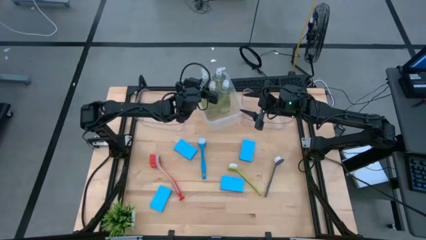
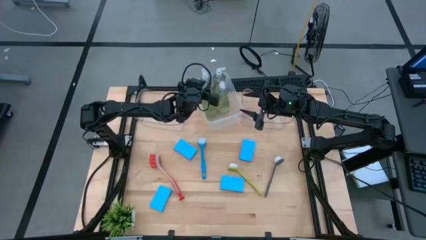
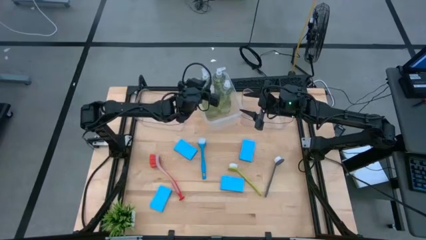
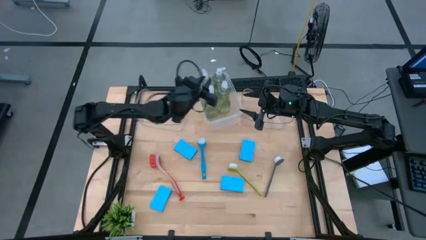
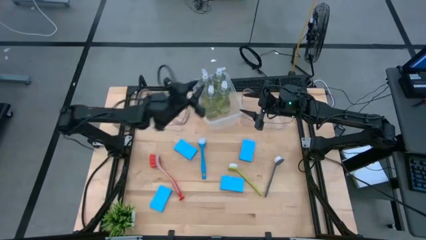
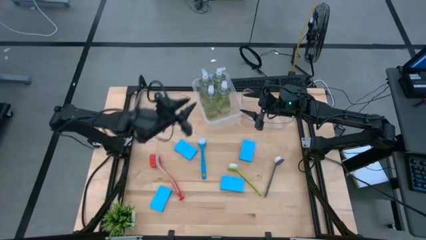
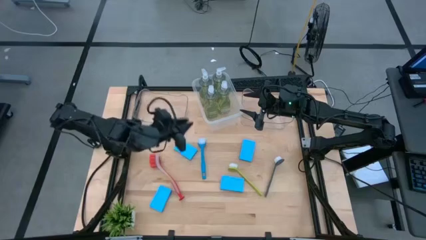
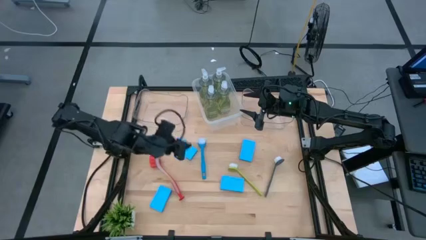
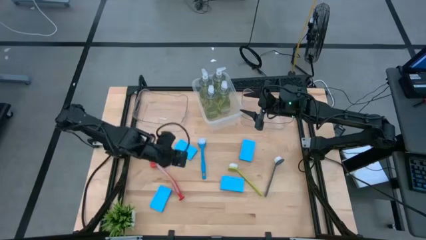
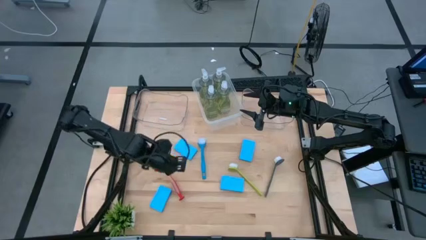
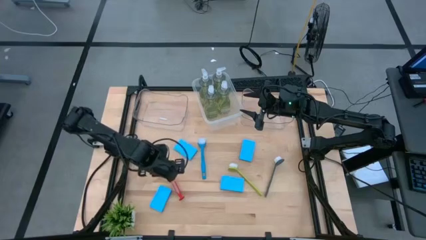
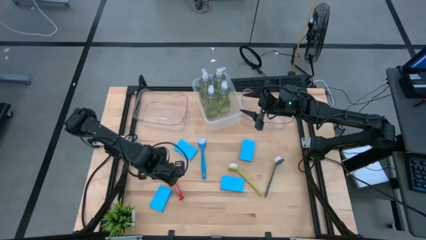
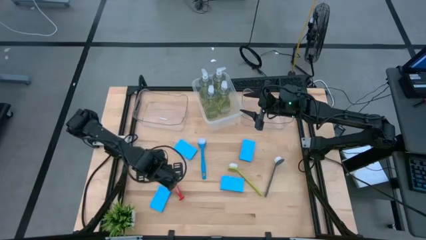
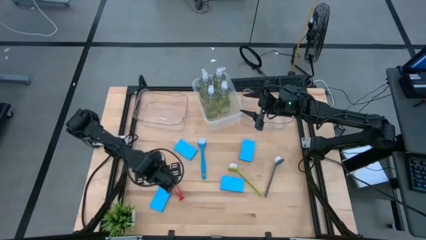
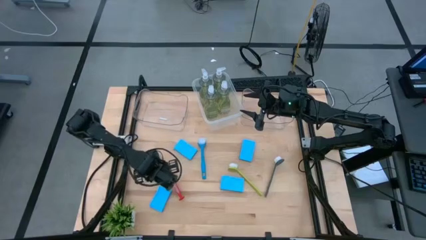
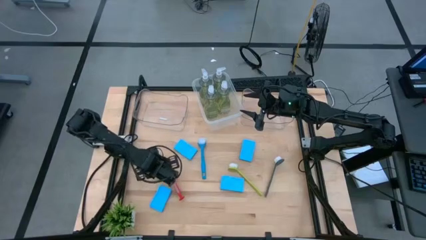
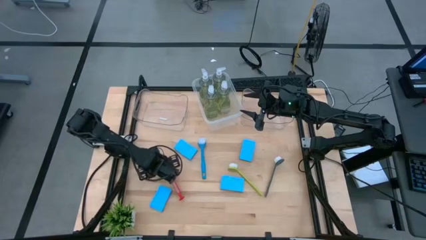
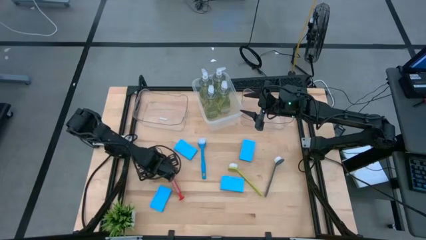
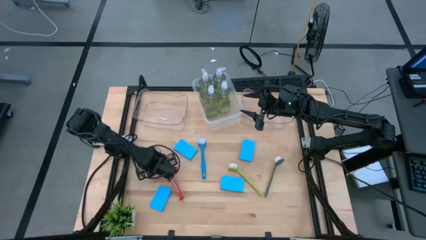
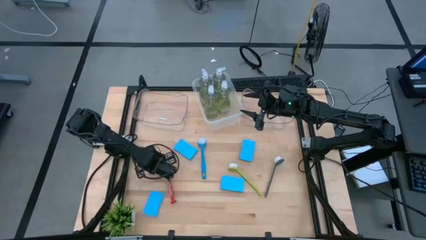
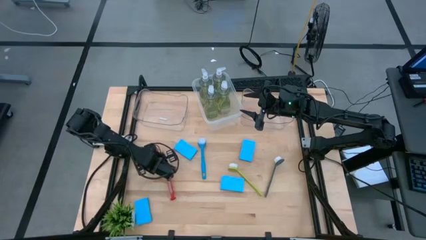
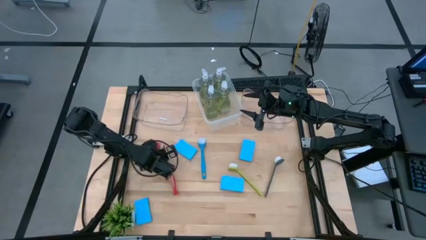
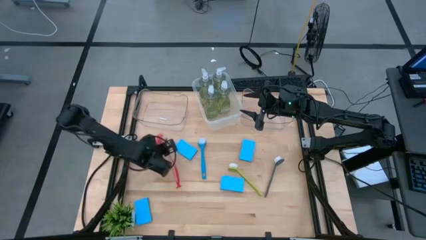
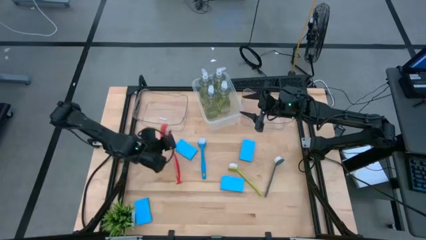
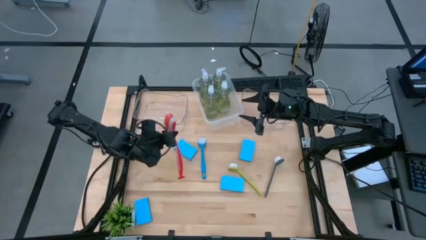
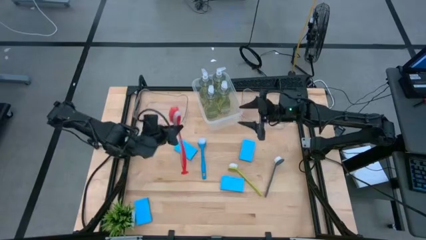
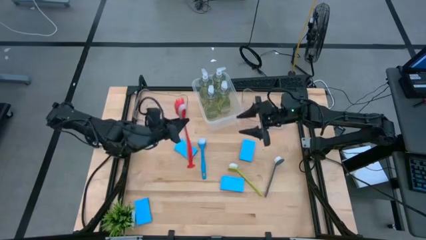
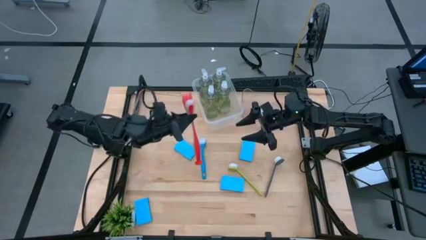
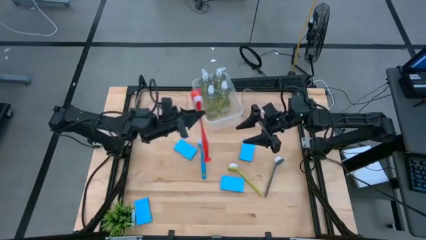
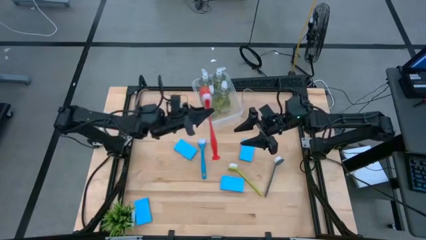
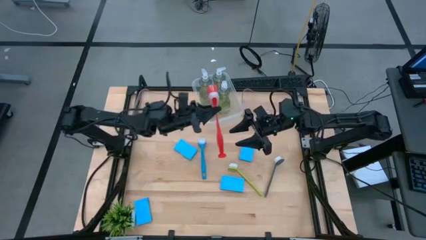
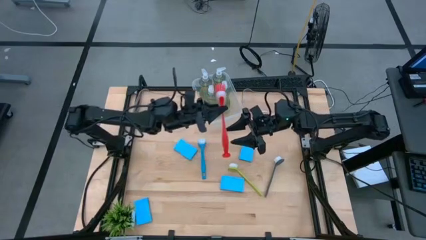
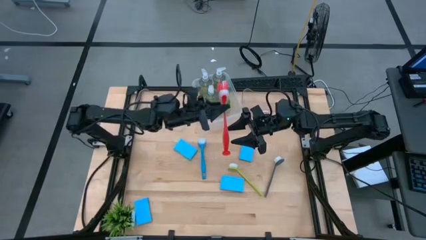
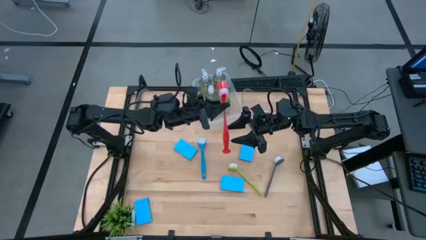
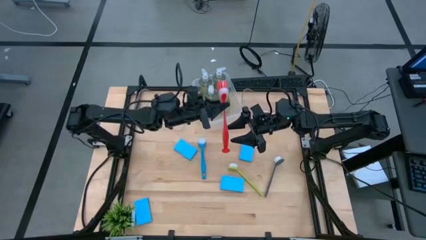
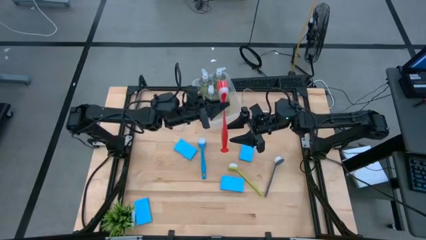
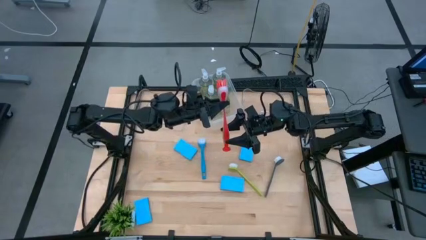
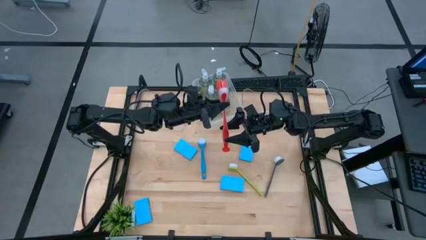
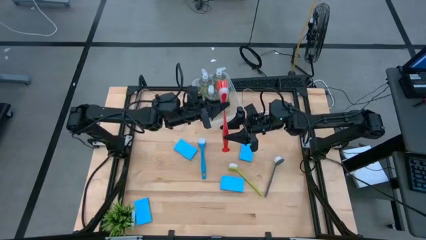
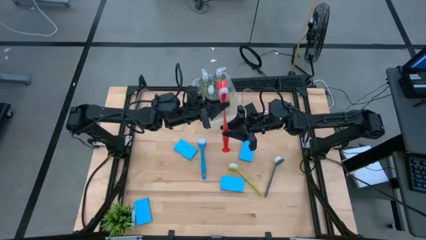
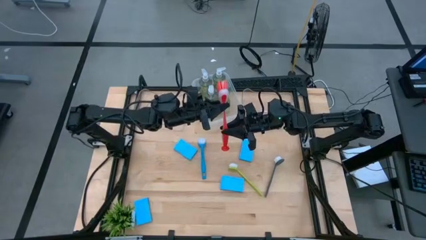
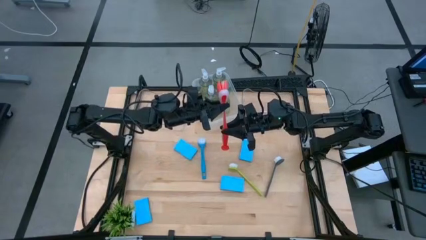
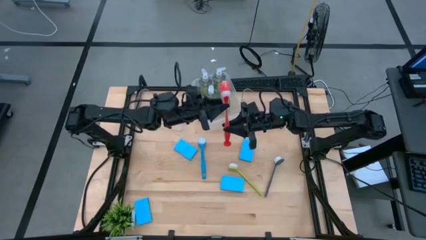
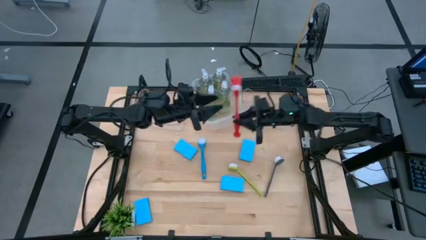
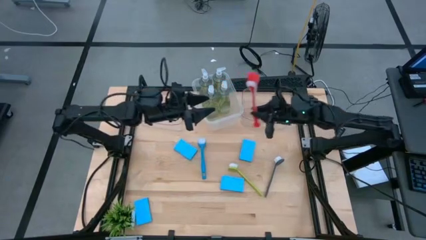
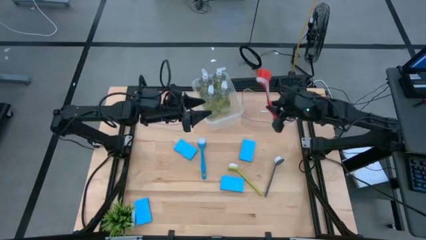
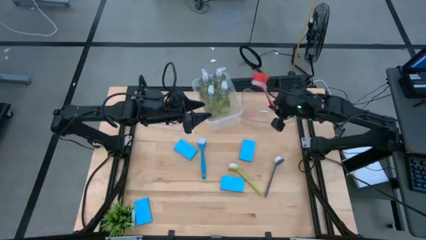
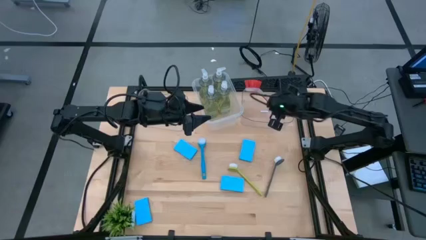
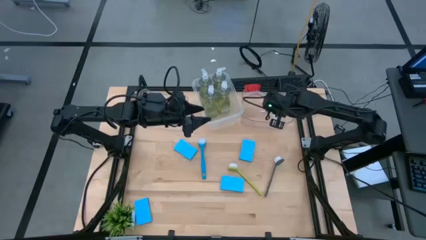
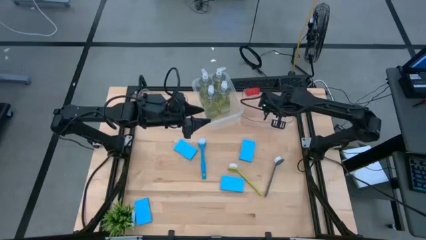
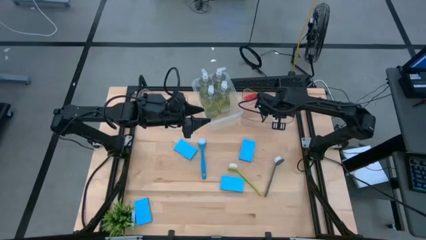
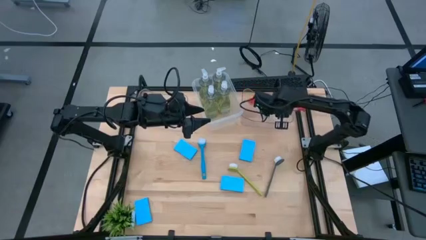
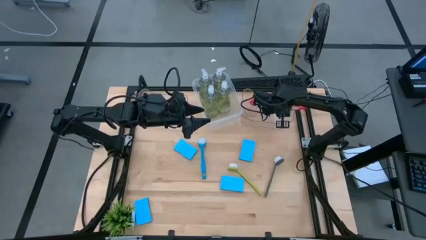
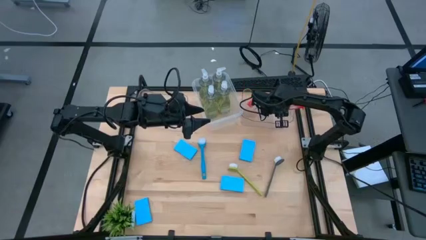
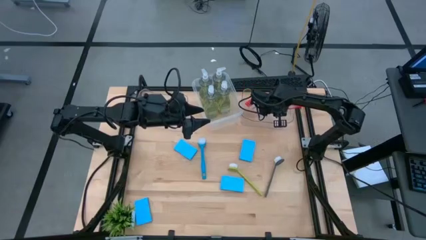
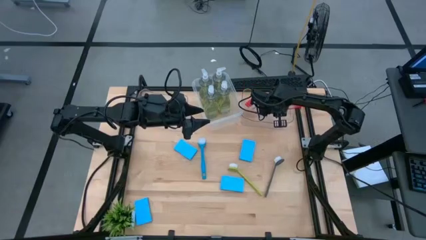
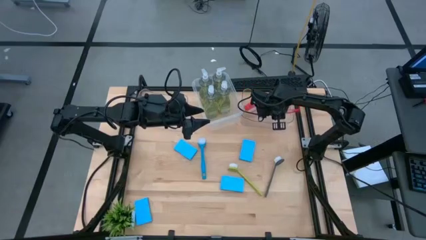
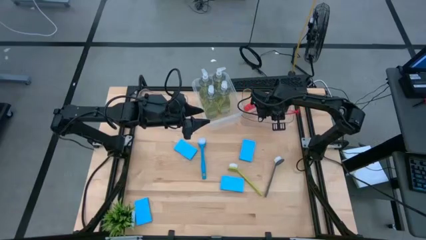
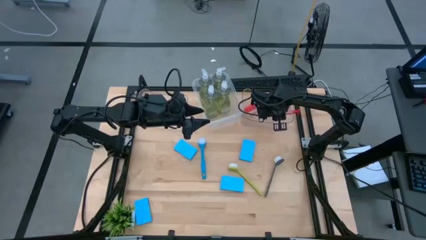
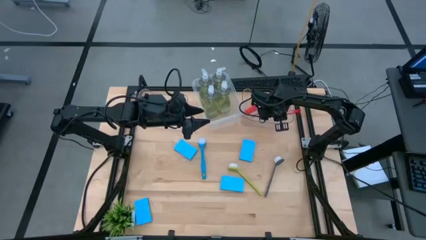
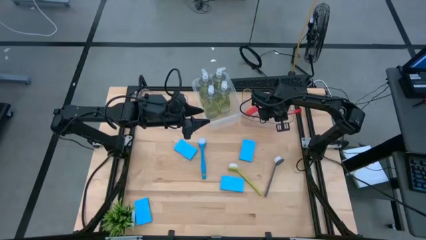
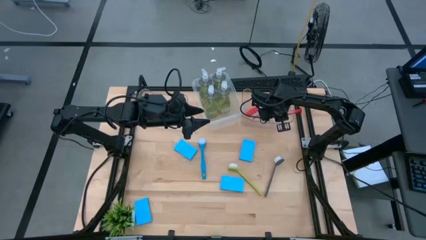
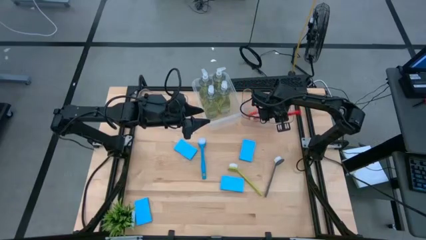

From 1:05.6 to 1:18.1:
Task: Pick & Place Kitchen Sink Supplies
Put the red dish brush into the right transparent bin

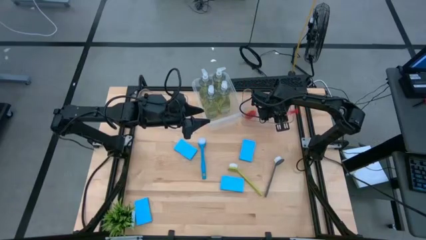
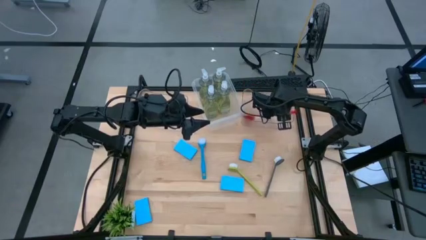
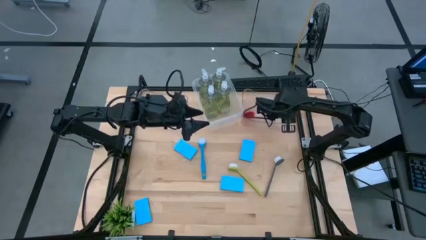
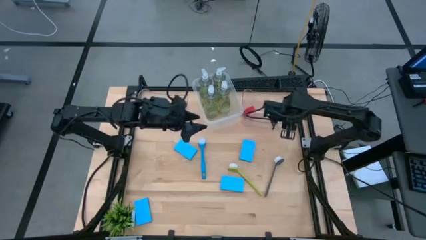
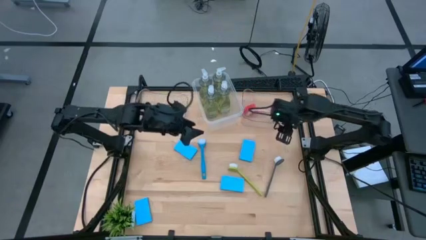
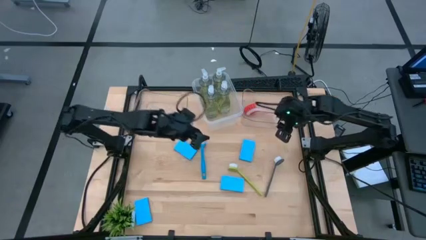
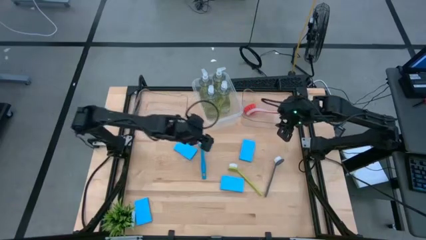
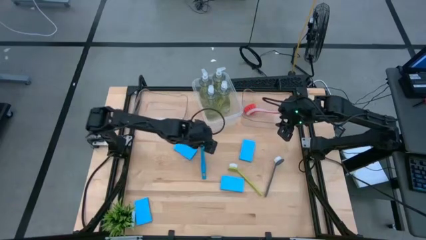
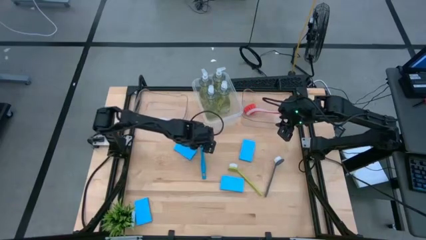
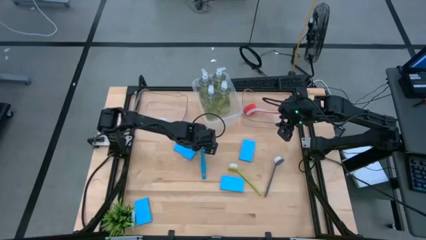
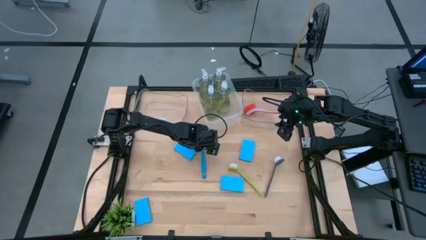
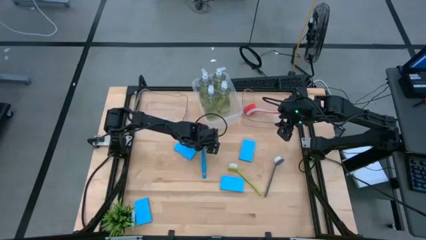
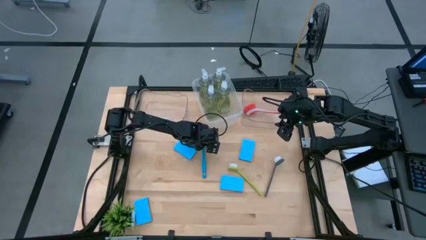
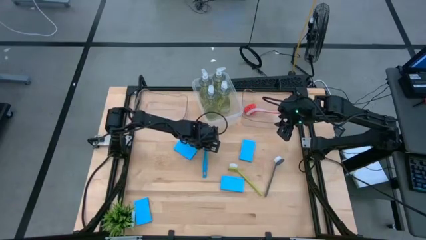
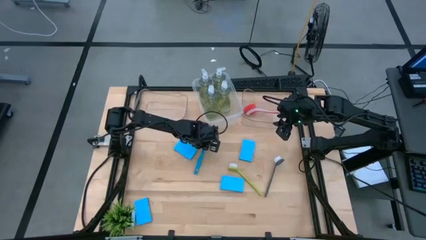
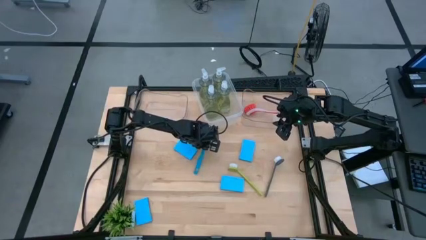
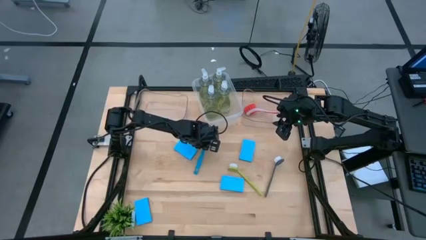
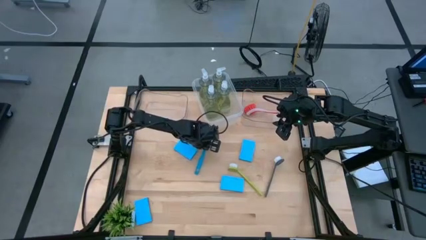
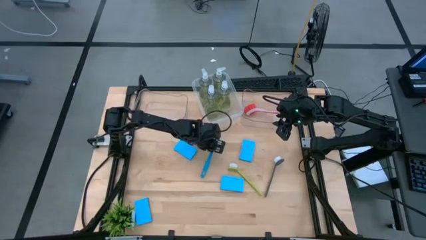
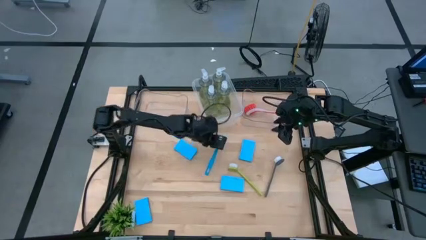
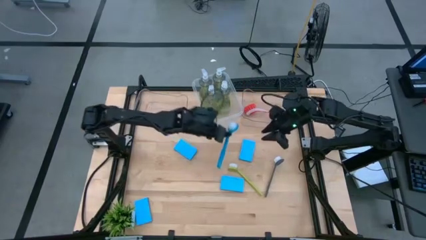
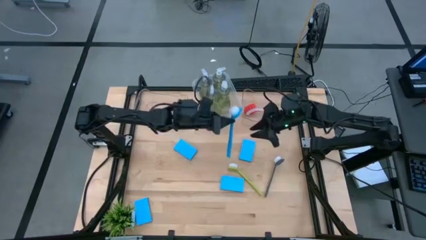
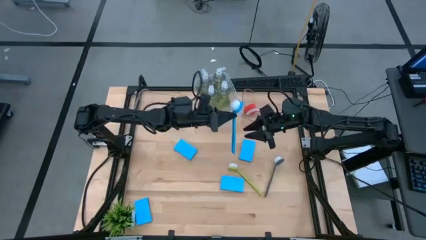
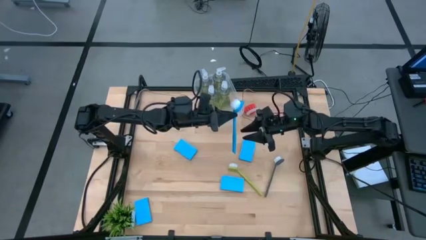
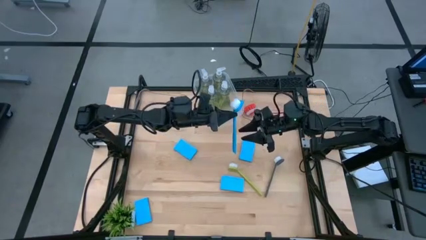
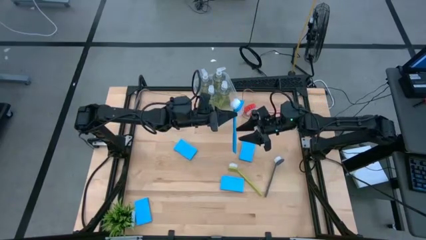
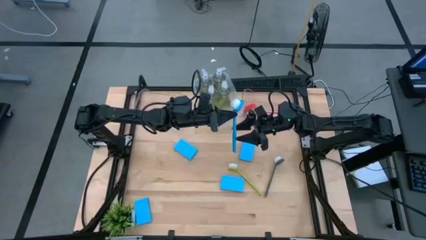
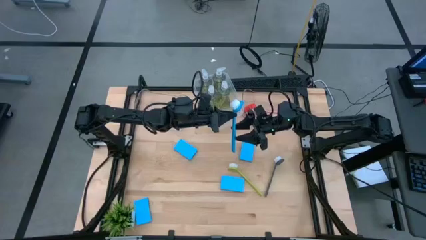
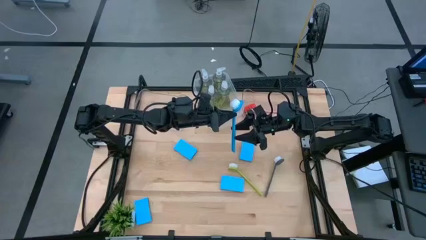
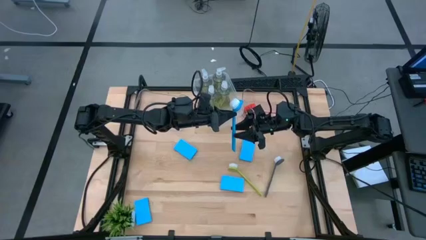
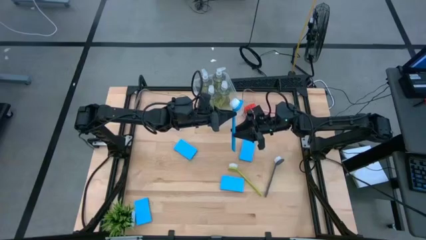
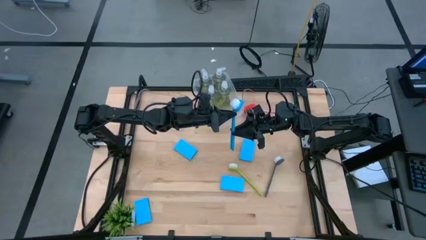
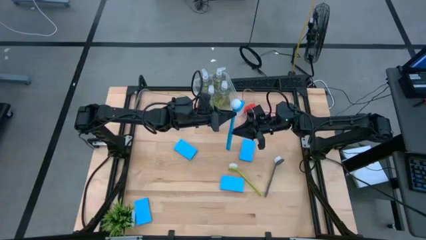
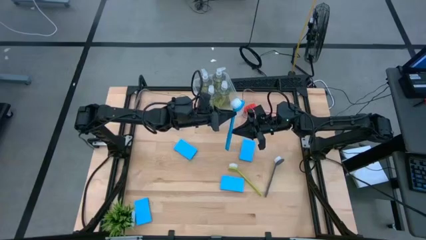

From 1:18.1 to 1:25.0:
Put the blue dish brush into the right transparent bin
